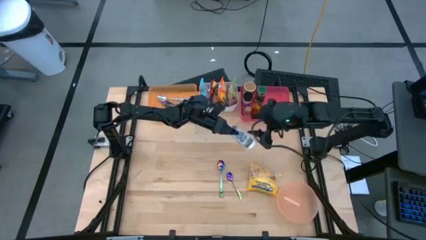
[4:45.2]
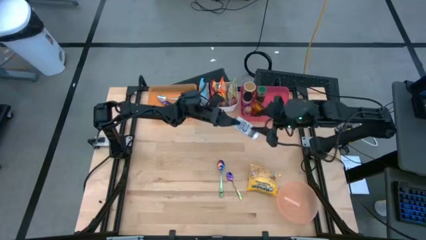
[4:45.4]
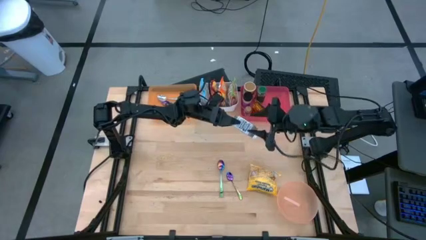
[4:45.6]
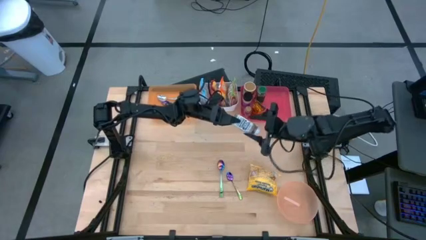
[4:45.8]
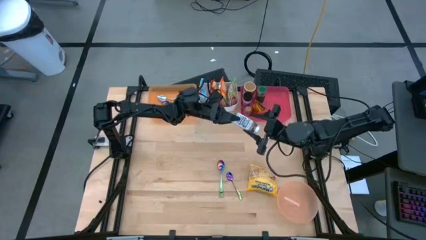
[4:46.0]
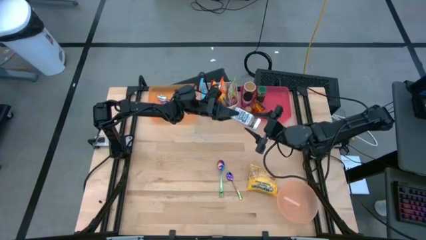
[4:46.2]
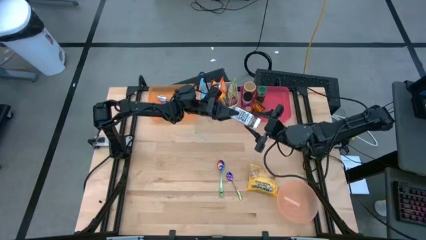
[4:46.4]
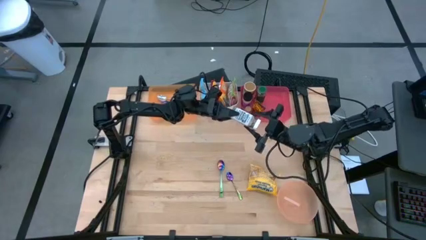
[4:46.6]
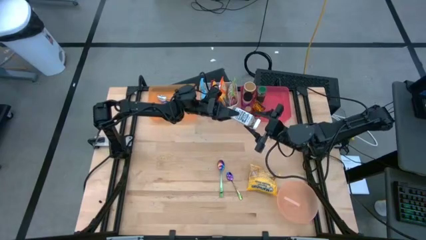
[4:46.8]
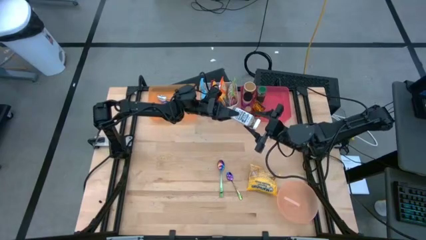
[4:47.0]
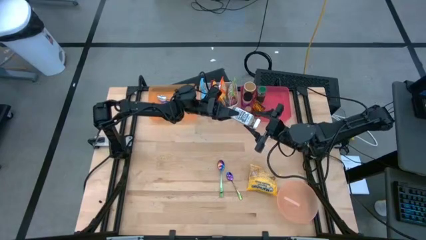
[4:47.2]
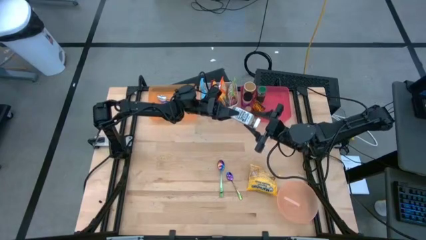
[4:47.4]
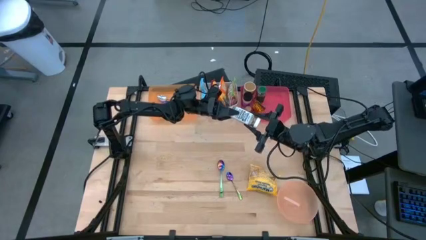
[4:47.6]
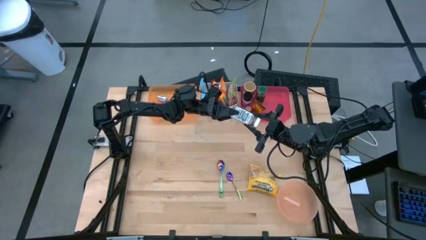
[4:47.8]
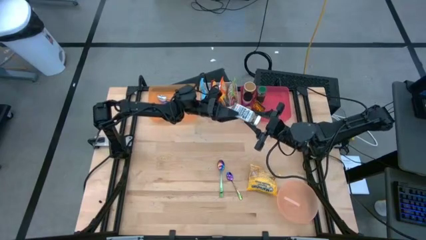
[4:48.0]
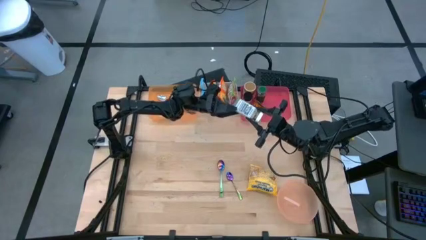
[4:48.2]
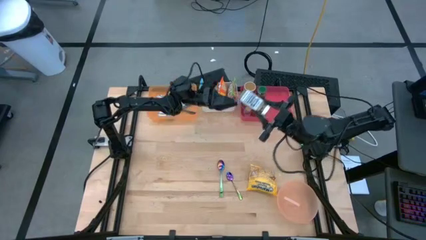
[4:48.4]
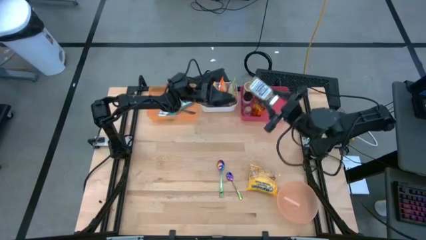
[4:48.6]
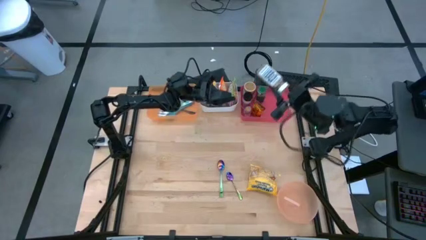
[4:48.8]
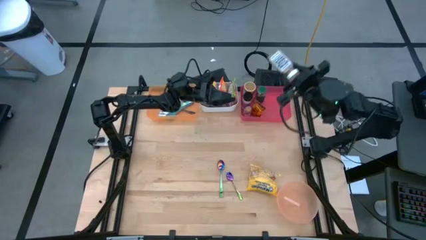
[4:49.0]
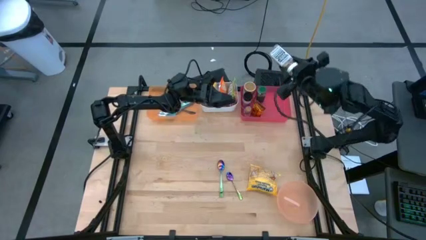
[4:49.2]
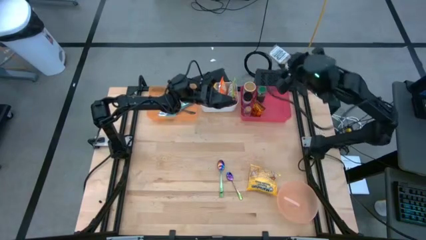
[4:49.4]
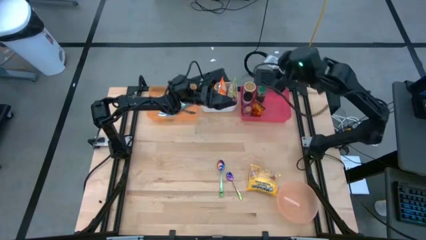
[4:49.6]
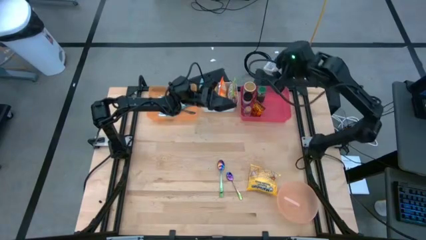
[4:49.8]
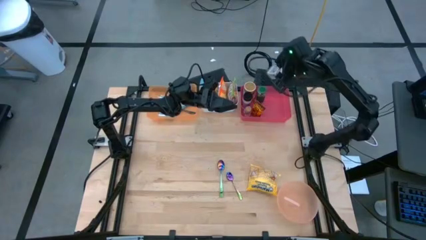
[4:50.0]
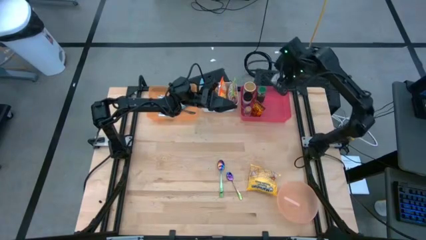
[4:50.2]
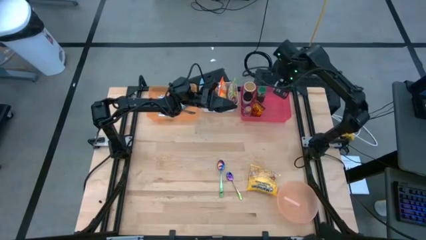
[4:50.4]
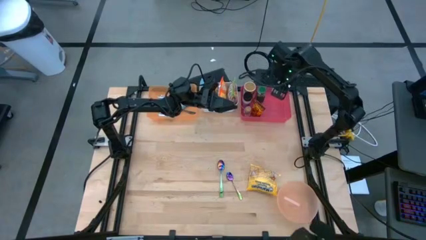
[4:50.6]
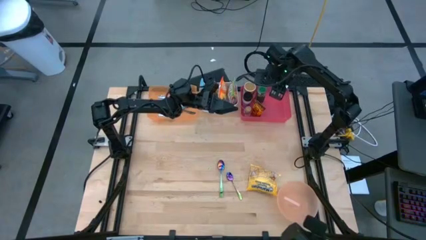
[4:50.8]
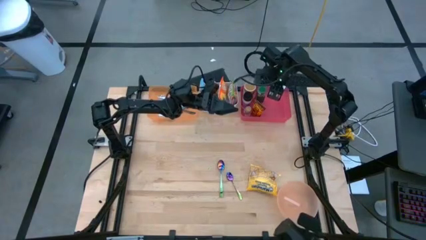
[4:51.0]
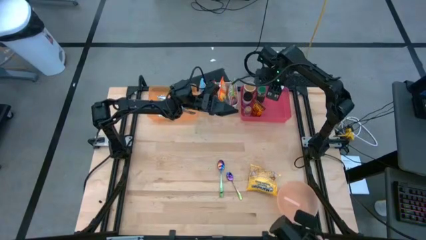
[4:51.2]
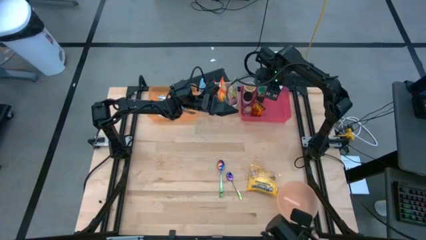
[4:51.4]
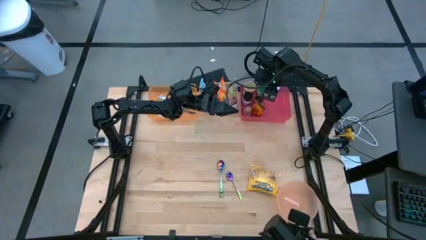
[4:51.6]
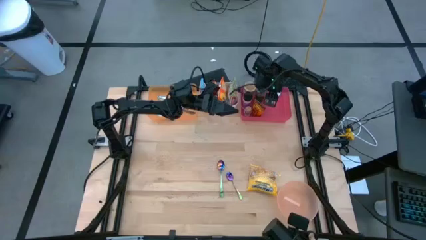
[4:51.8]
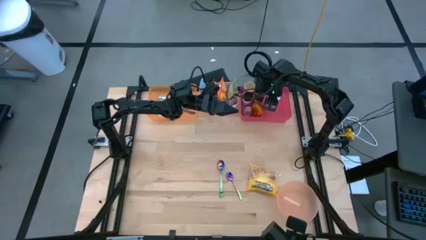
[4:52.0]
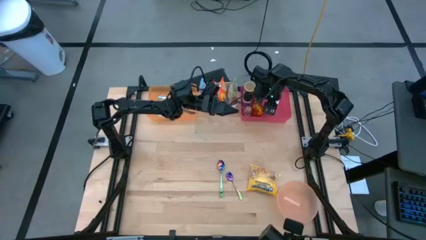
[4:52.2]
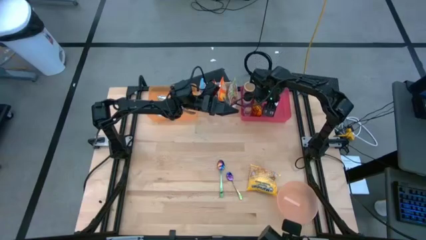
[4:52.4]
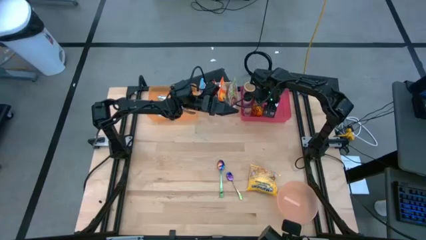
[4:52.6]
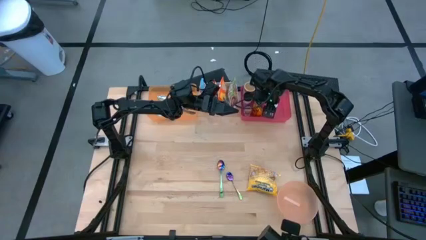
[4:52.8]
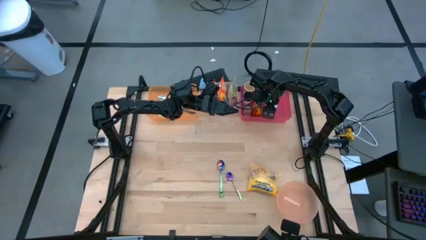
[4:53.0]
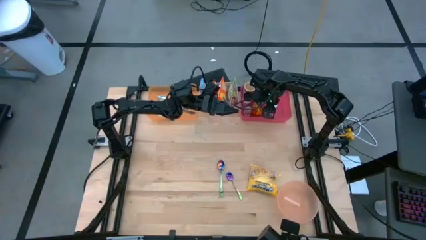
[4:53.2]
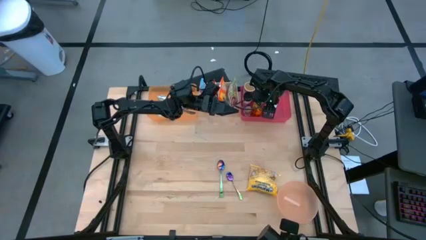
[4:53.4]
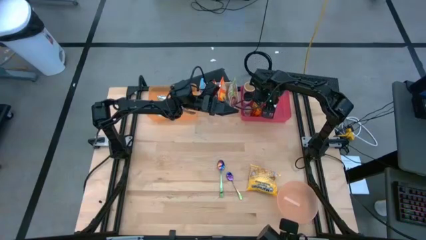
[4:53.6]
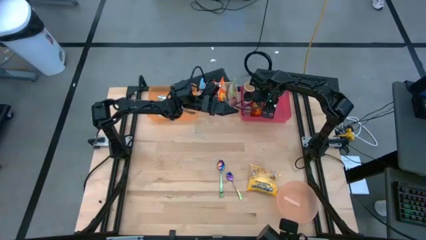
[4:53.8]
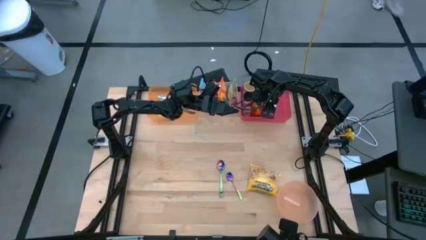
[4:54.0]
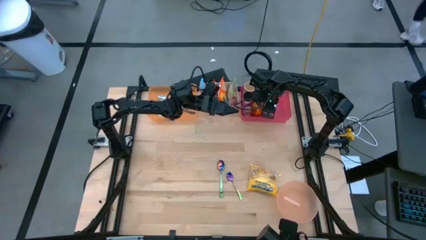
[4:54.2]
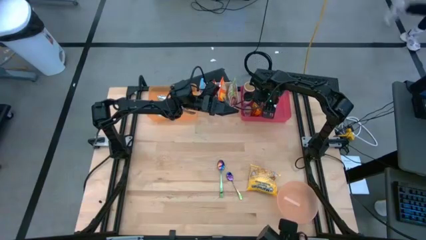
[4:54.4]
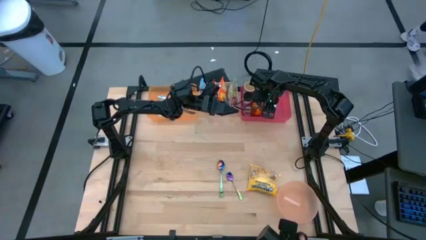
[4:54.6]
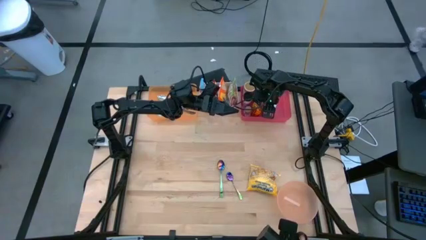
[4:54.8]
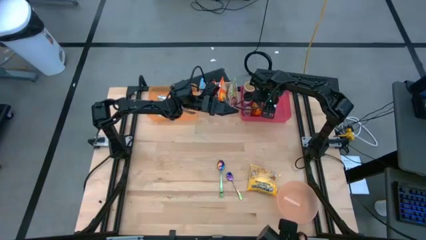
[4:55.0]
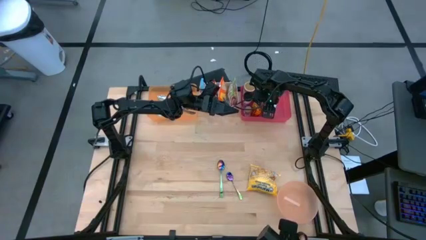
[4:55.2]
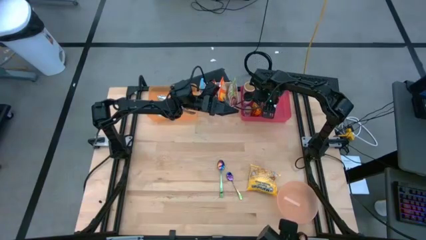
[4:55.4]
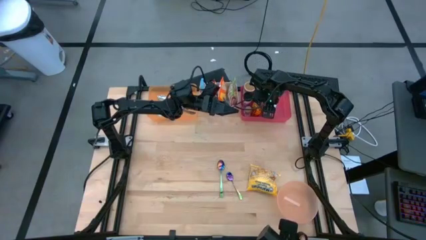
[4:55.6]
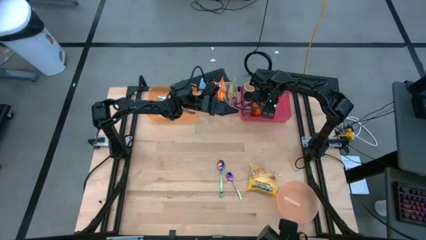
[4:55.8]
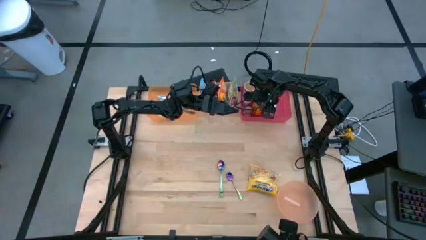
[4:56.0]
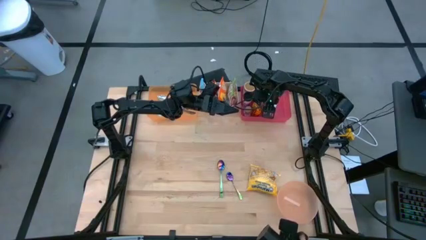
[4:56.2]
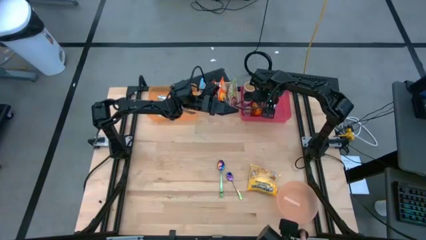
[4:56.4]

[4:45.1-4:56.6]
Task: Pick & Place Food Item
Put the white spice bottle into the red bin
